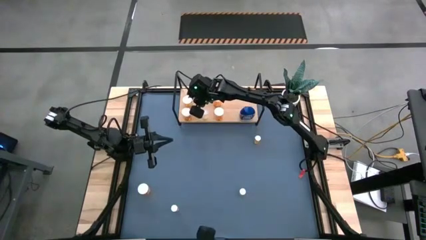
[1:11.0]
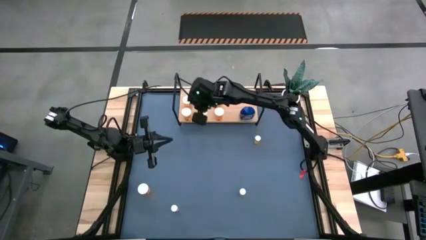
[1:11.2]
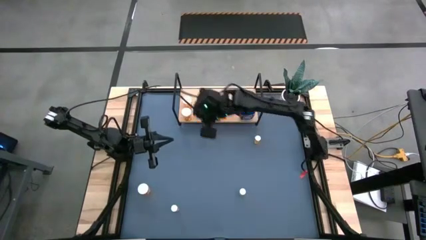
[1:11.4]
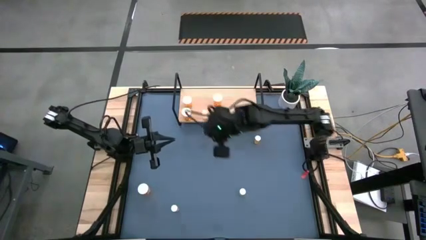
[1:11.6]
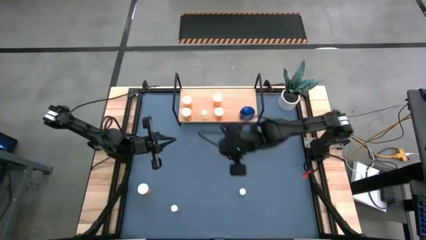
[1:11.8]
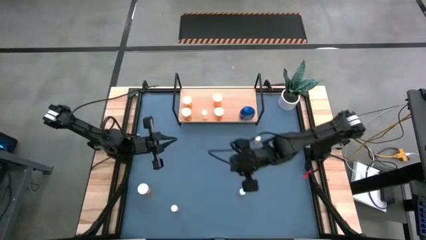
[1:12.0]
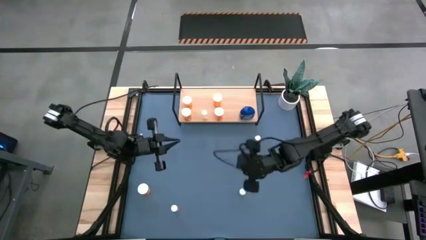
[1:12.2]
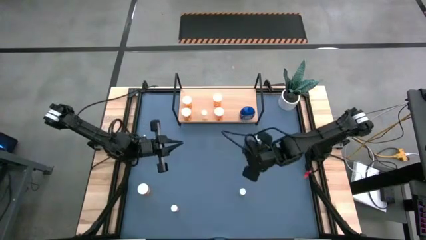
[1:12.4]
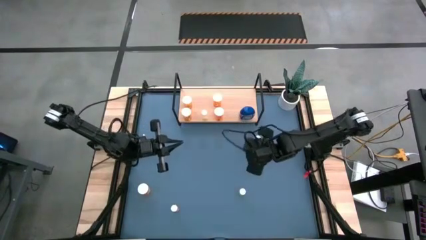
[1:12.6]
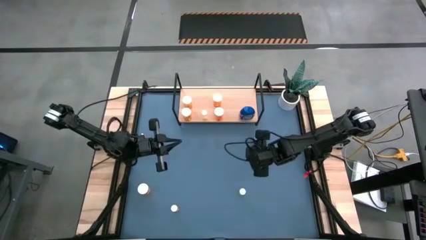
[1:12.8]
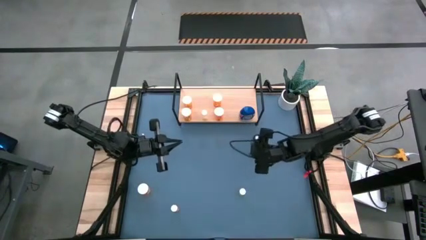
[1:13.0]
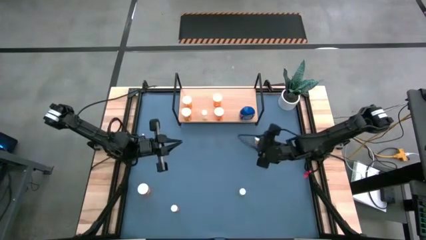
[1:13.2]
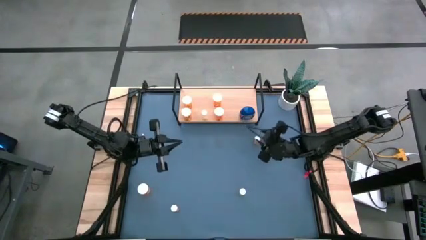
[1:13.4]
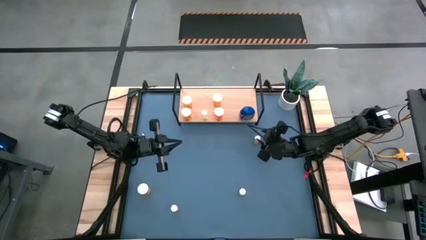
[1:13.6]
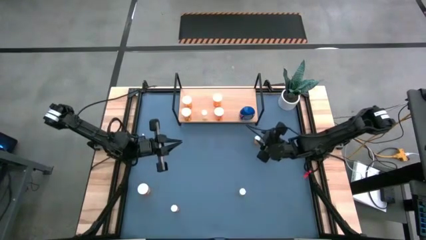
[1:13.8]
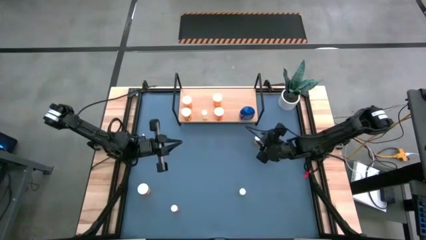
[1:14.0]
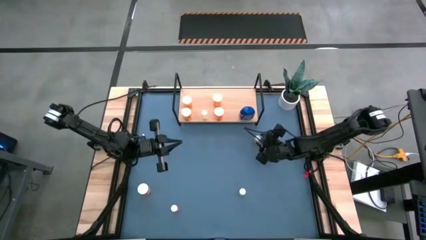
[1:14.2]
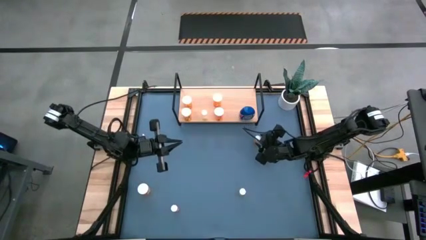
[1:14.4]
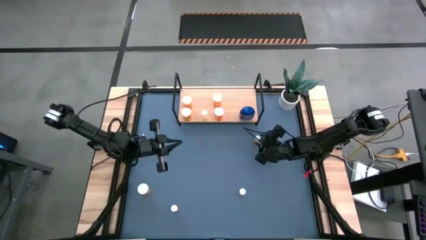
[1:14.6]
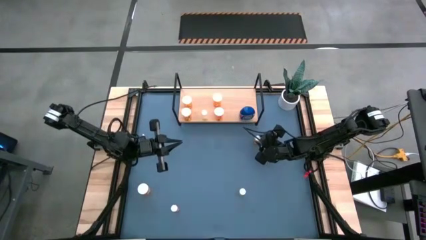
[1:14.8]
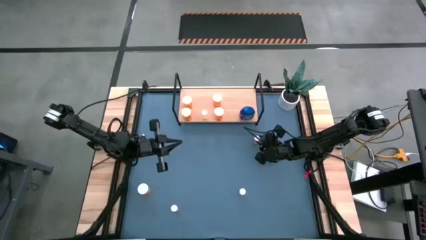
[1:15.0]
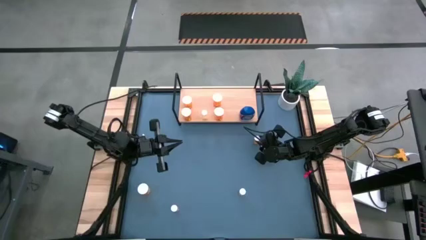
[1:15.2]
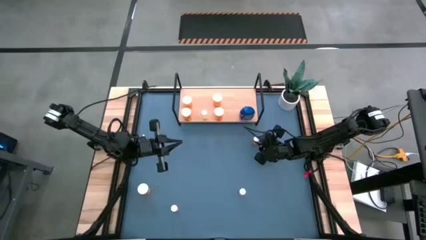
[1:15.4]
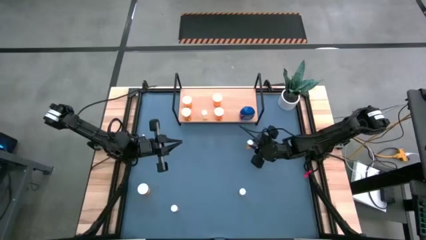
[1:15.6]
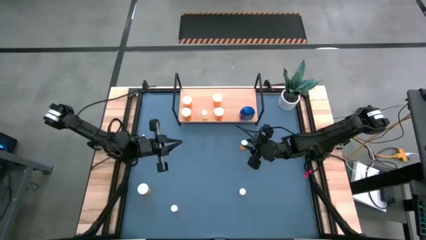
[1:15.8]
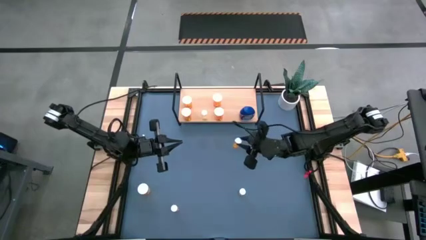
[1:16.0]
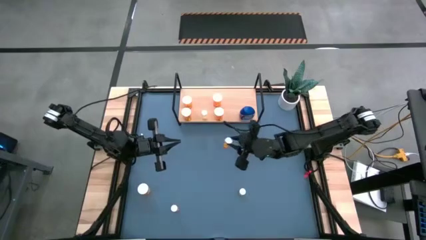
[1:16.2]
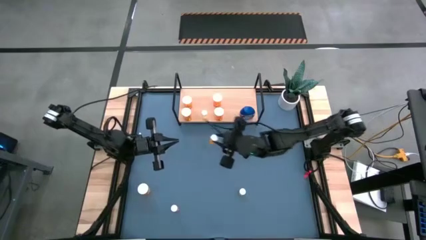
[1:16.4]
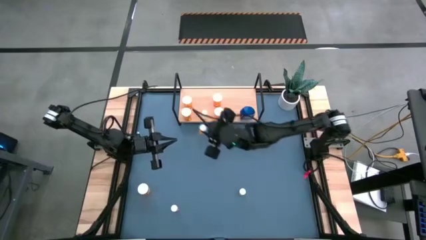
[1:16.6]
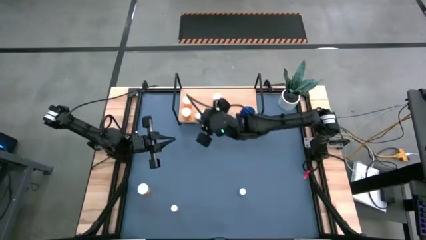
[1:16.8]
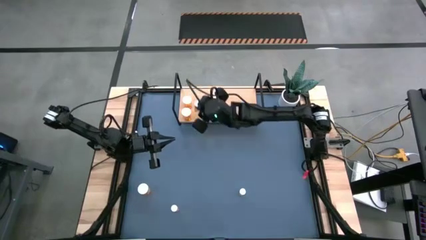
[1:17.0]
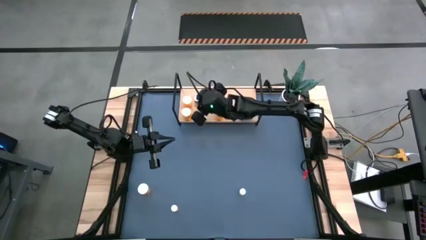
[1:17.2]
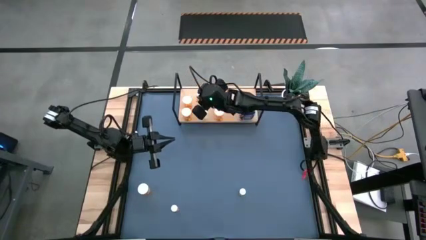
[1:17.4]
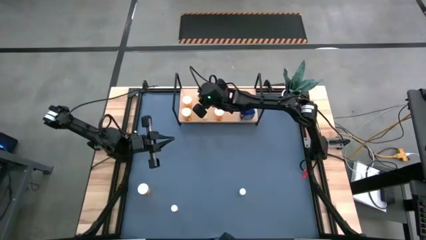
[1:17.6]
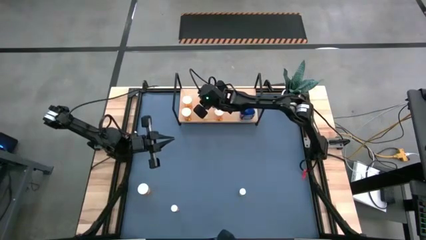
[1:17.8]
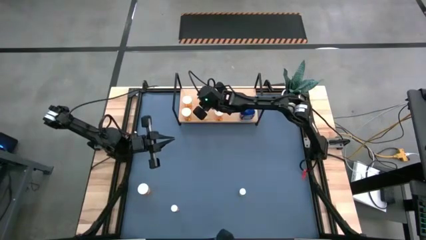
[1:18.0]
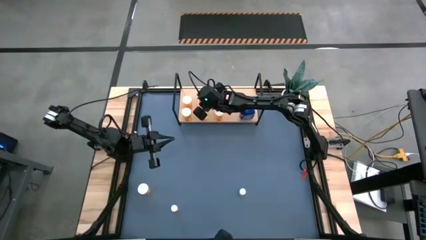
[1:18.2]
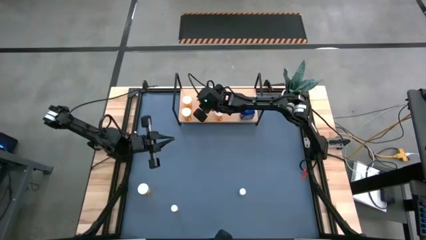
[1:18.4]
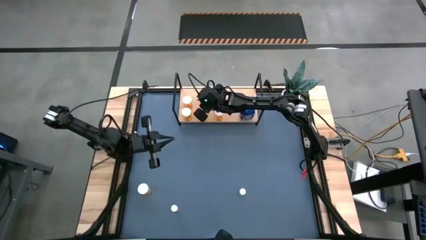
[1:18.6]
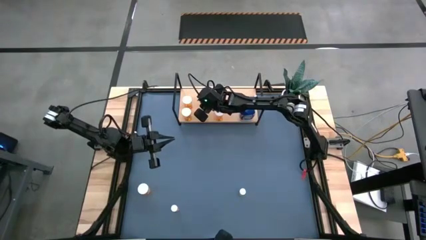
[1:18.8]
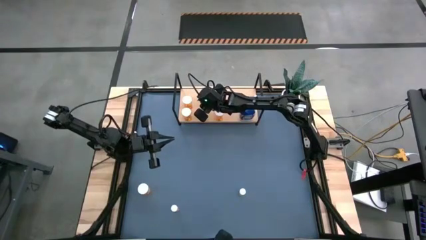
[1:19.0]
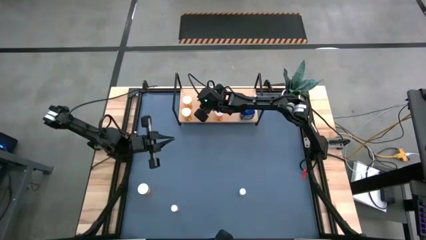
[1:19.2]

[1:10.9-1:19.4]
Task: Pick and place medicine bottles onto shelf by color
Put the small orange pill bottle on the shelf
